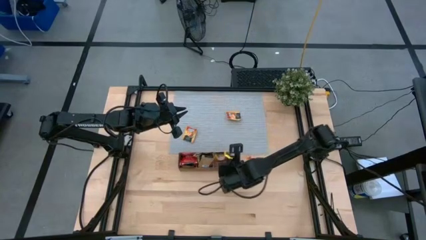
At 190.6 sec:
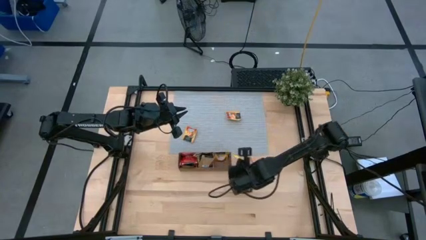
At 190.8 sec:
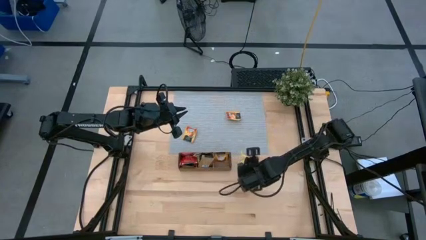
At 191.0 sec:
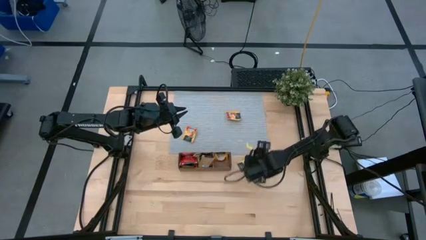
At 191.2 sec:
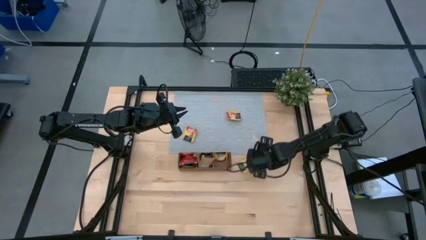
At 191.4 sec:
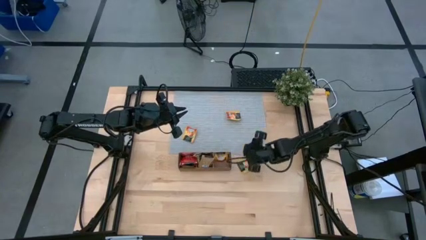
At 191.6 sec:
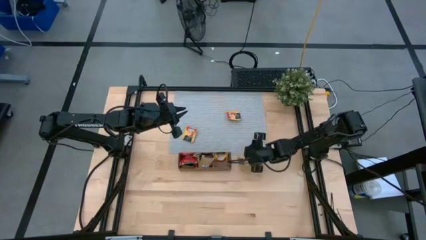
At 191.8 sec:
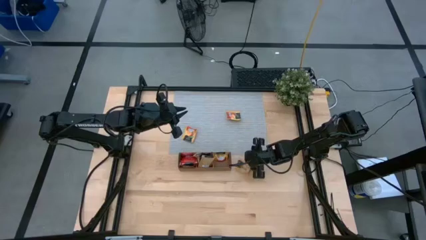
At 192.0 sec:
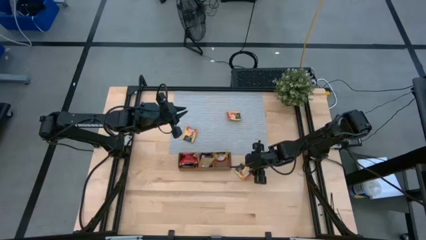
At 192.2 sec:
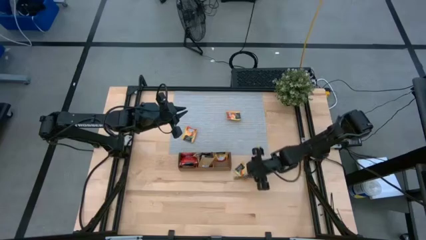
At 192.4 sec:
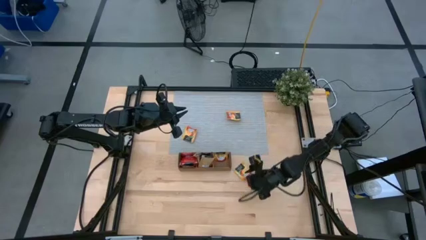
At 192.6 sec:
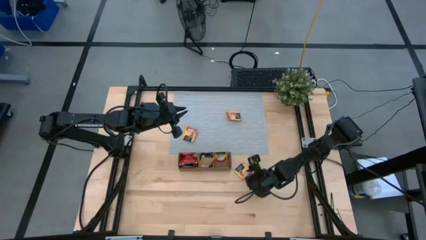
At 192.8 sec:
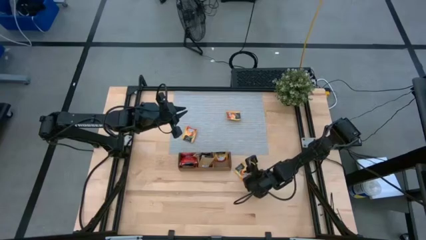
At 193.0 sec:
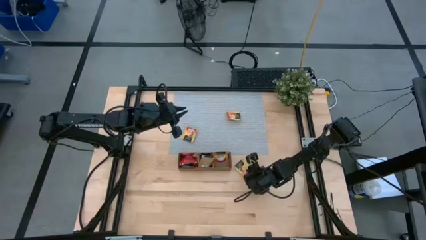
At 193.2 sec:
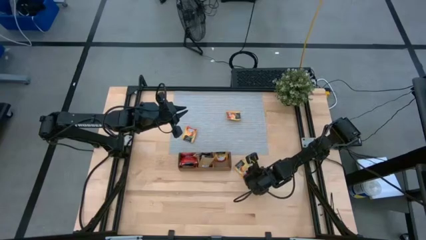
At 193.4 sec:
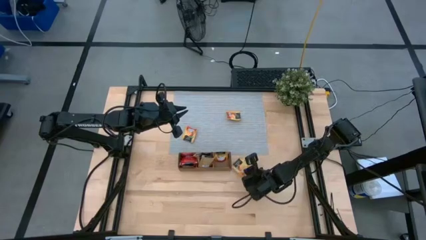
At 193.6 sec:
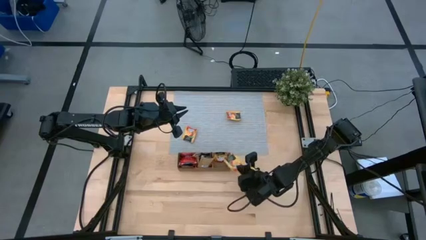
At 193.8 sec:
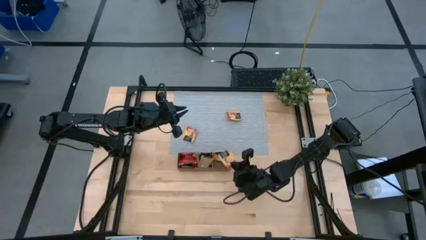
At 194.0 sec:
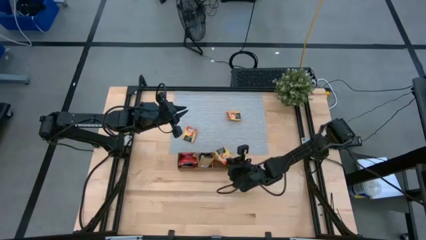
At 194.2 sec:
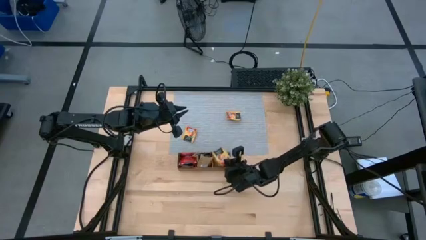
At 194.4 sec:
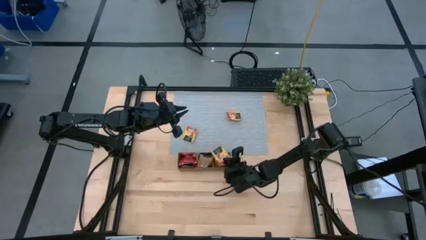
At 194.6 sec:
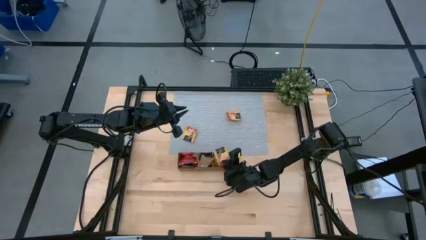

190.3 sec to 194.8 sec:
Task: Pick & Place Tea
Put the yellow tea bag into the right section of the wooden organizer

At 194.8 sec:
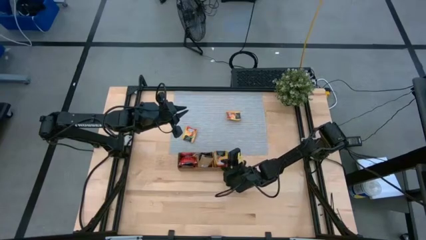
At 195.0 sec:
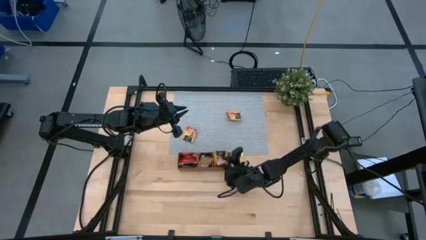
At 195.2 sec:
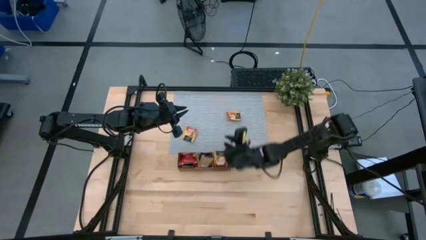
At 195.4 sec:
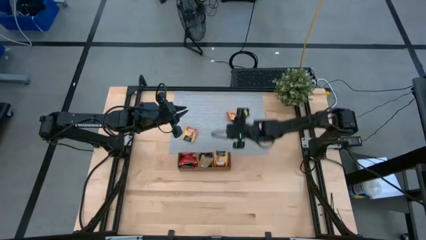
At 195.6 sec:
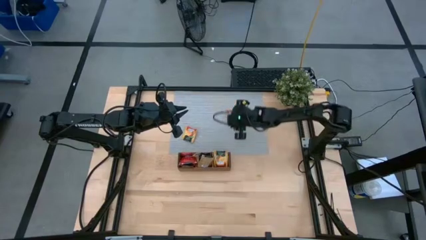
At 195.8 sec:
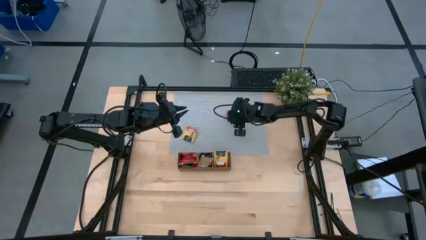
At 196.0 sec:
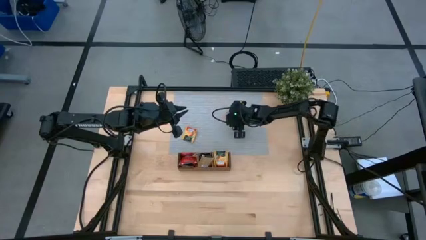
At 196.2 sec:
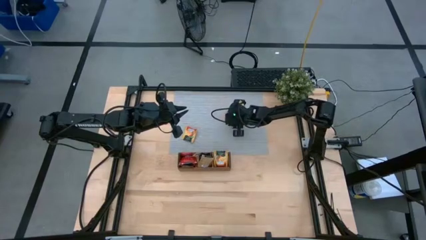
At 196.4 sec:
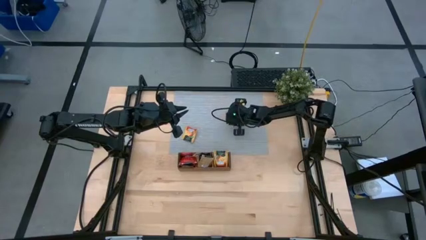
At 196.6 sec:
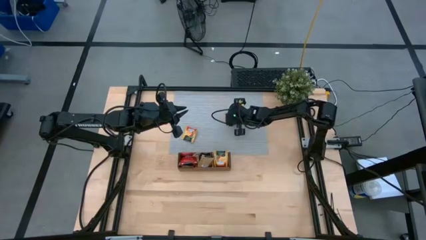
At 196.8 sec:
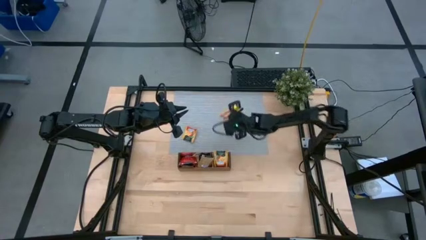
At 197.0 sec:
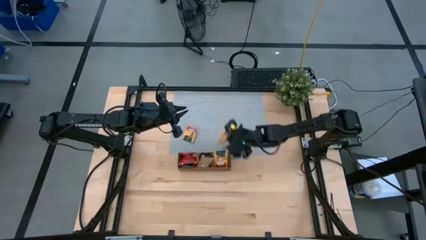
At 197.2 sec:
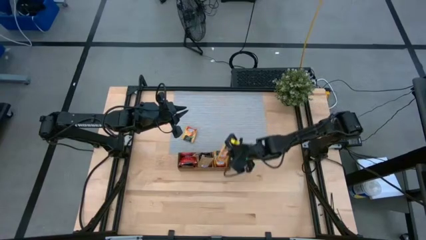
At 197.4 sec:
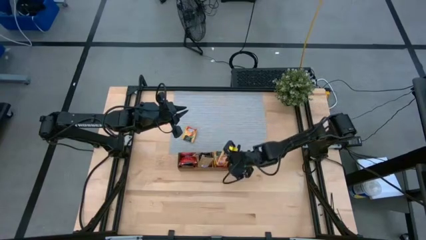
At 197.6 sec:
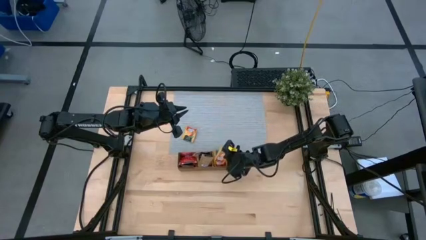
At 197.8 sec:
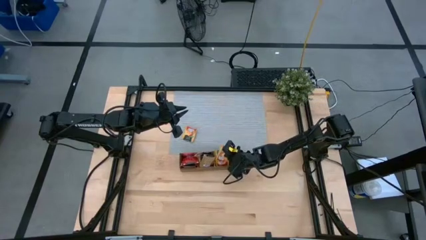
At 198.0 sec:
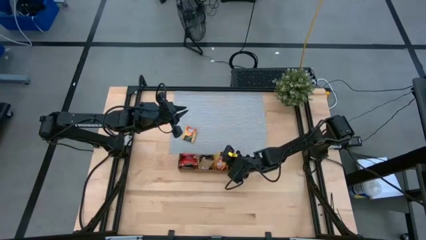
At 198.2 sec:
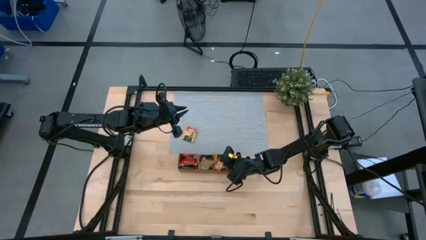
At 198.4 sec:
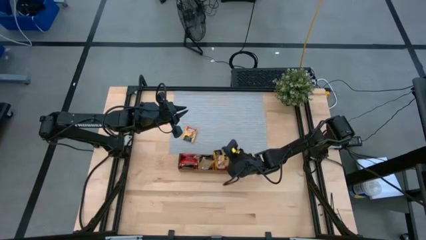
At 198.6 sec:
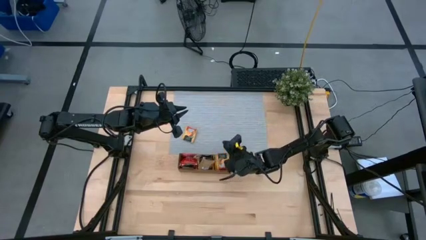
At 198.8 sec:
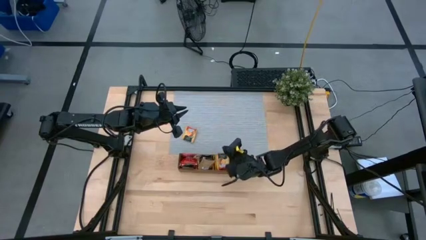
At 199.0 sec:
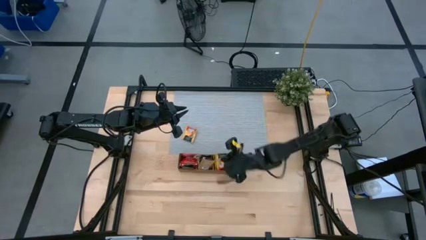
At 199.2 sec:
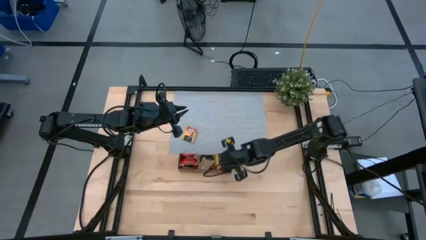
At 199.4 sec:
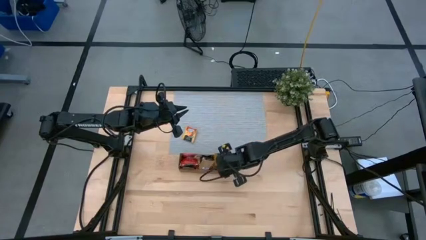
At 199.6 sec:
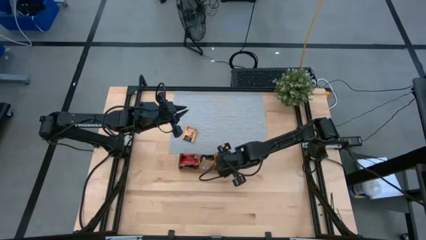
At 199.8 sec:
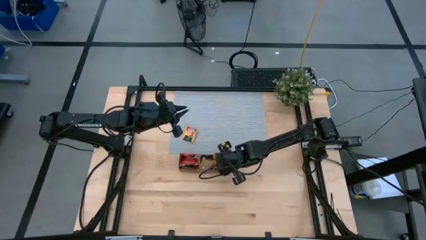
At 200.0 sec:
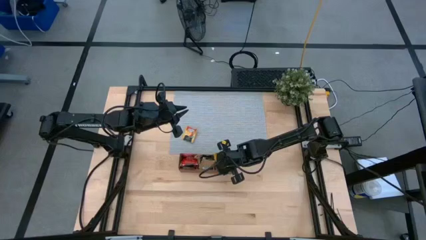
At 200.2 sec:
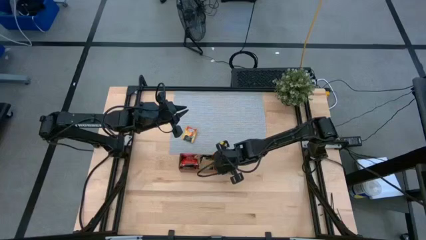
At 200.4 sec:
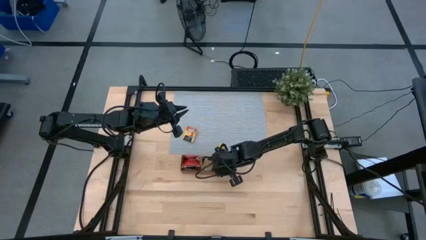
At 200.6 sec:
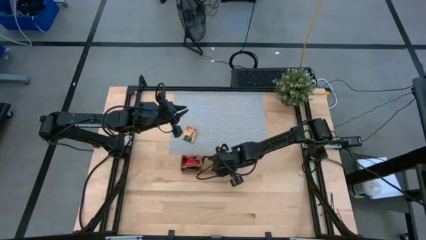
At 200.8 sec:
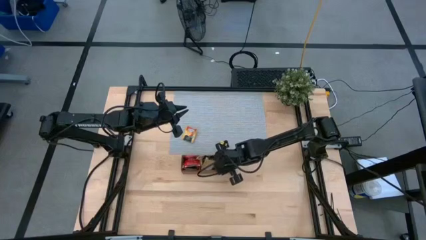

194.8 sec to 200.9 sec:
Put the yellow tea bag into the right section of the wooden organizer

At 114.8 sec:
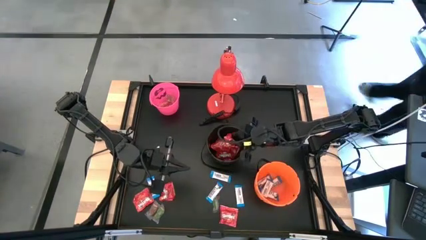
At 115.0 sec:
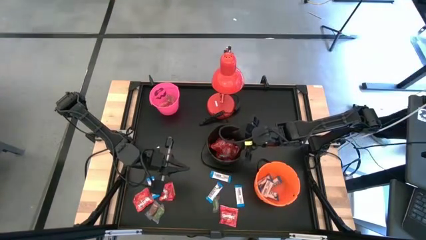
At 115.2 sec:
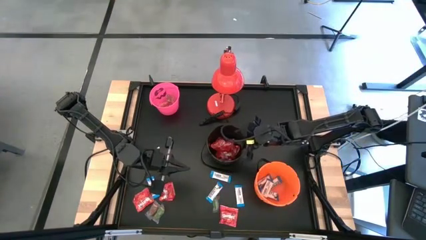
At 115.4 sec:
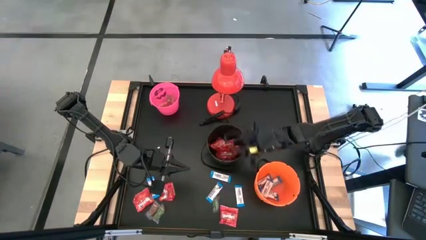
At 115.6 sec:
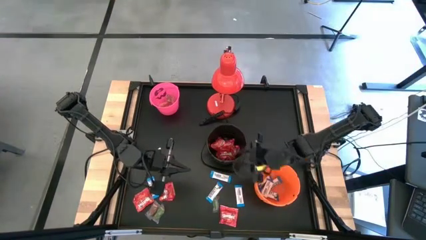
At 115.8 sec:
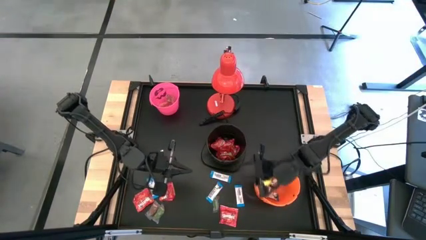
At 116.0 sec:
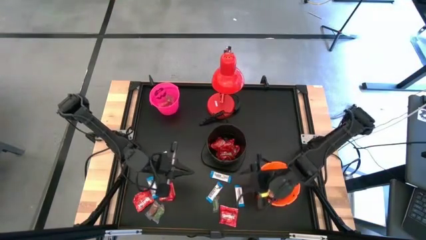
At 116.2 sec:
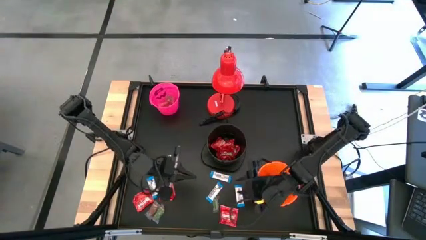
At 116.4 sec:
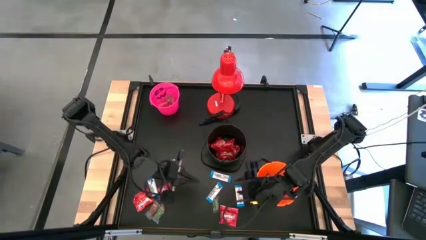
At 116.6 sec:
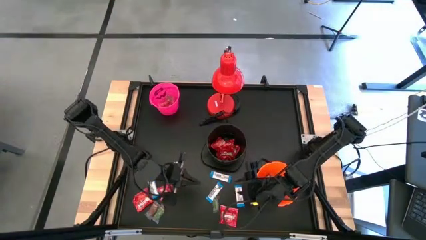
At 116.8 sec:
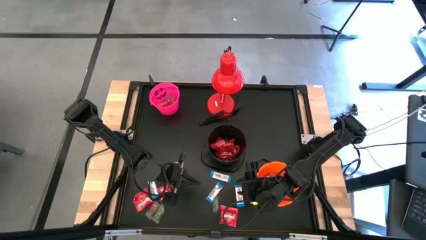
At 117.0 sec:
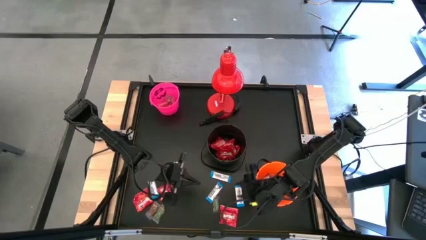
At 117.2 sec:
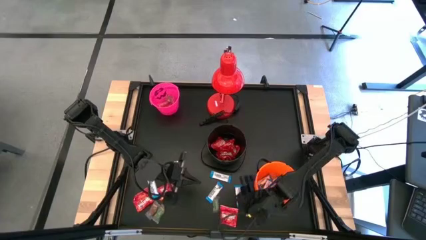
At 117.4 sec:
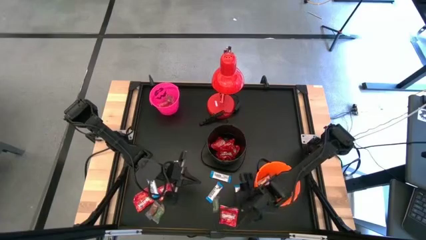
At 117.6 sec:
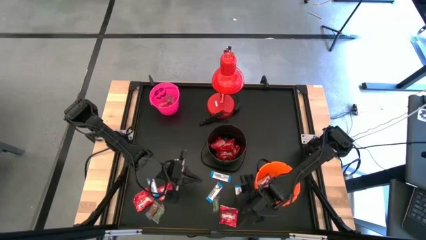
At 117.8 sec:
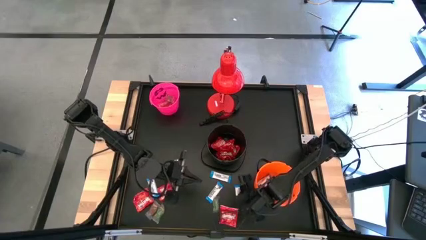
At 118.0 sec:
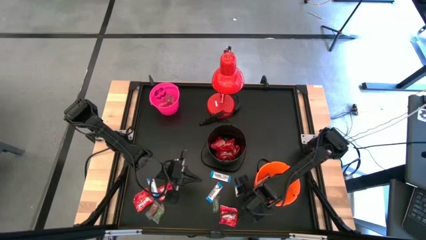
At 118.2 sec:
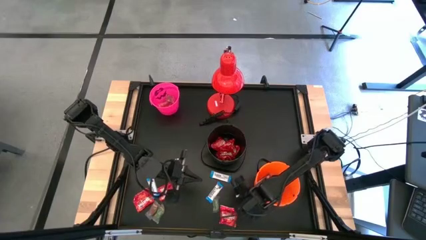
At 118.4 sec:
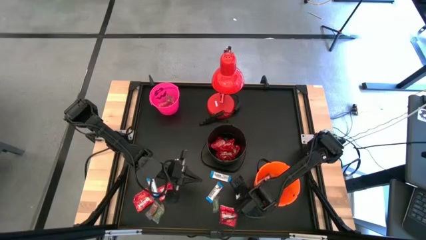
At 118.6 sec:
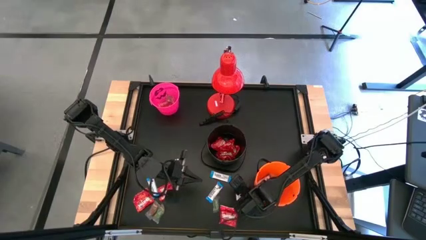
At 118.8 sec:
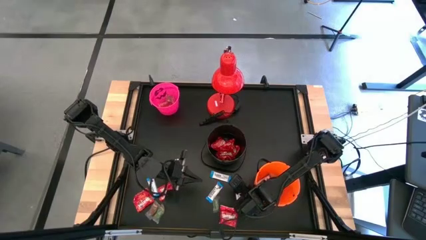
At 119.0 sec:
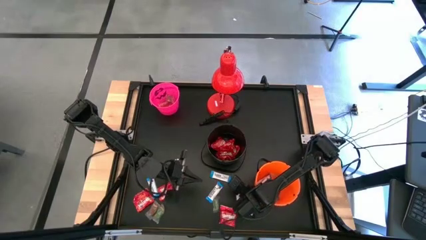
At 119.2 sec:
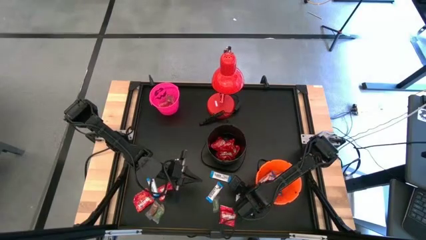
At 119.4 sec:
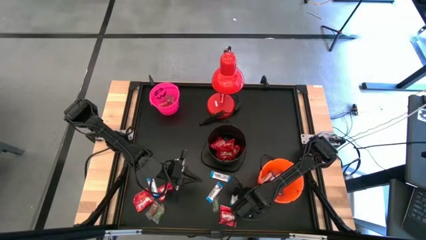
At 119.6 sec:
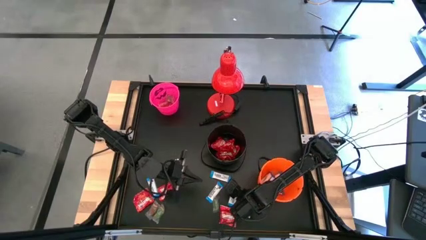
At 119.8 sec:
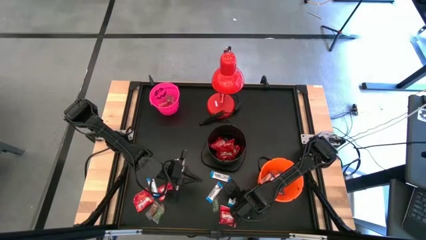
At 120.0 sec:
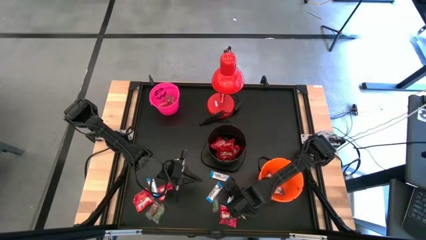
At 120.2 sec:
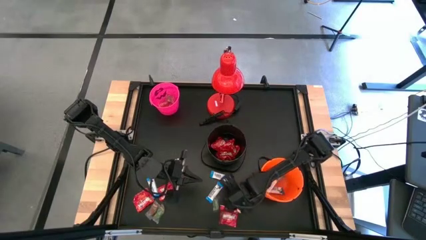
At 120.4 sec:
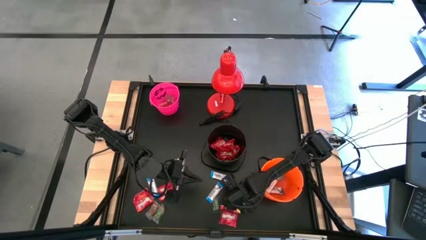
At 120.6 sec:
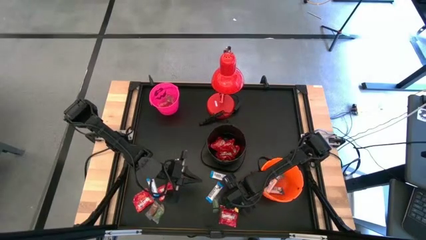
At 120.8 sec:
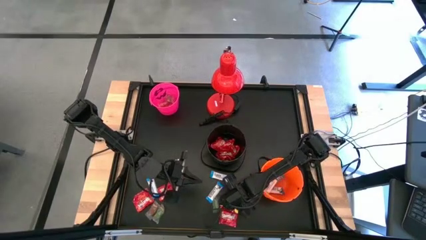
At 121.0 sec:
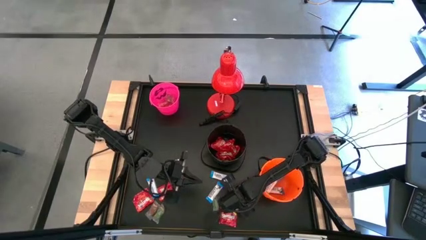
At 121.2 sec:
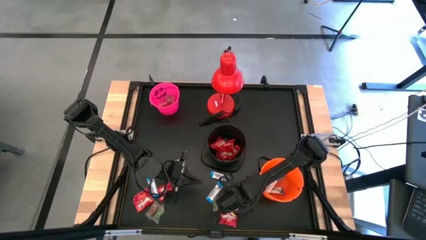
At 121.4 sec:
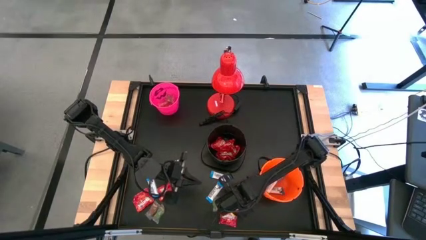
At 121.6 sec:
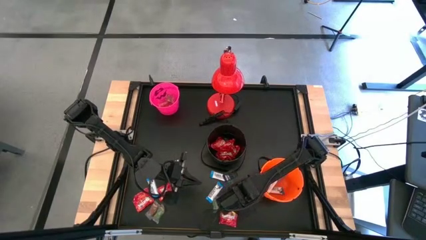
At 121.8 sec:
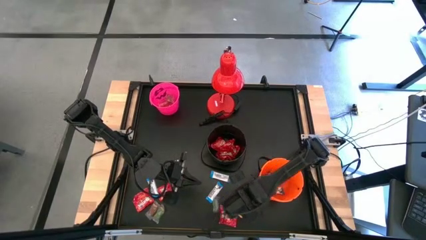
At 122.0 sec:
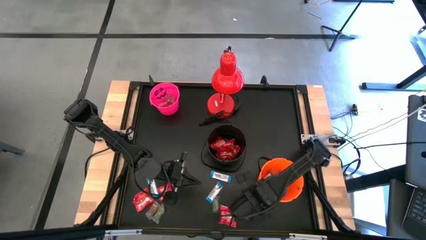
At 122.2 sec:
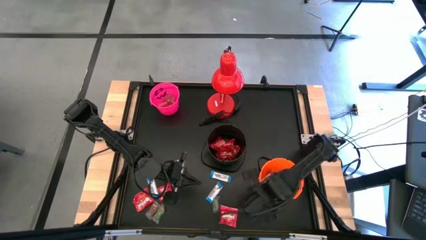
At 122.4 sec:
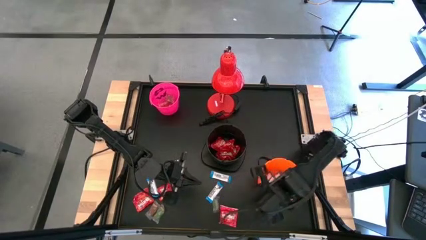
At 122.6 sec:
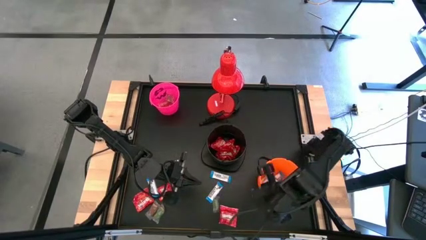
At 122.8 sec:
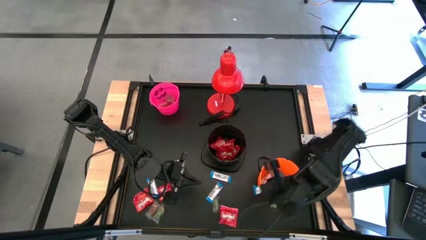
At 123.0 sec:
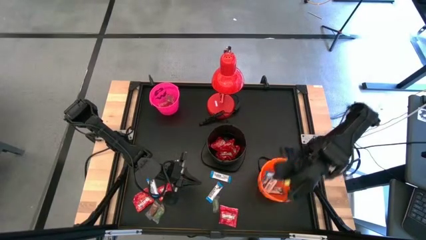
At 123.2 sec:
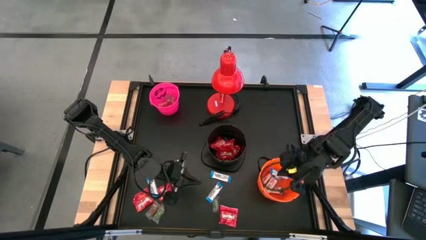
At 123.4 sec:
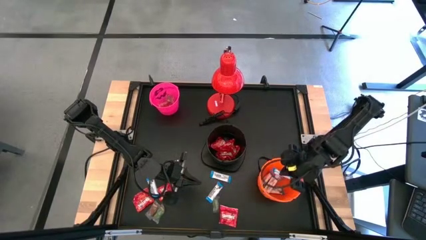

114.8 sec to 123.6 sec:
Task: Organize candy in baskets
Put the white chocolate into the orange bucket
